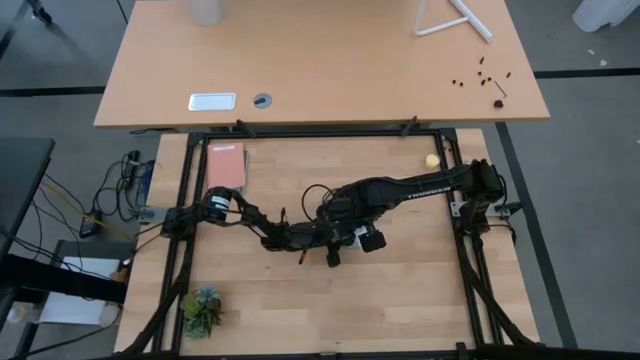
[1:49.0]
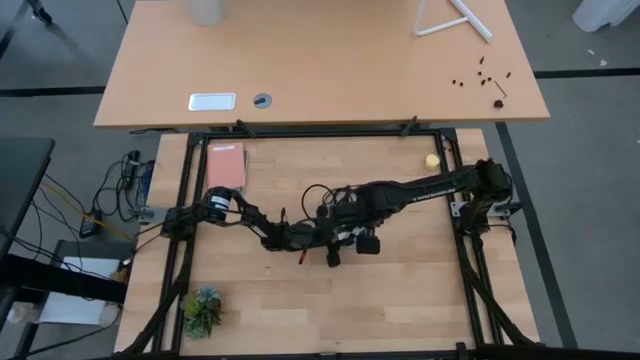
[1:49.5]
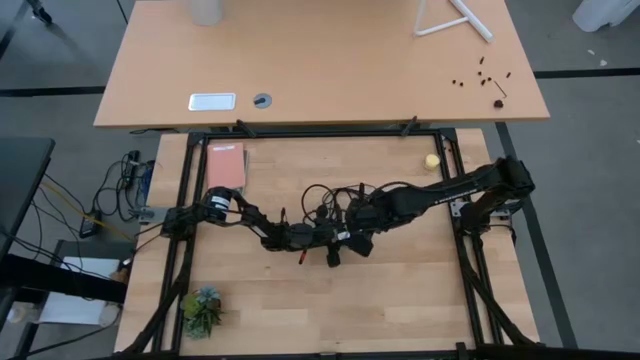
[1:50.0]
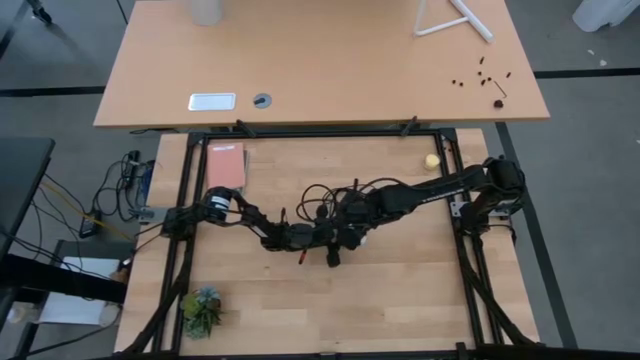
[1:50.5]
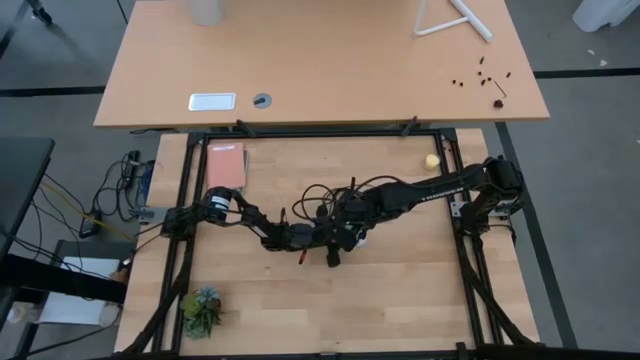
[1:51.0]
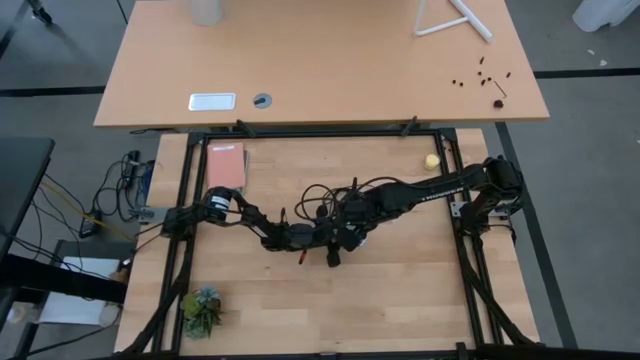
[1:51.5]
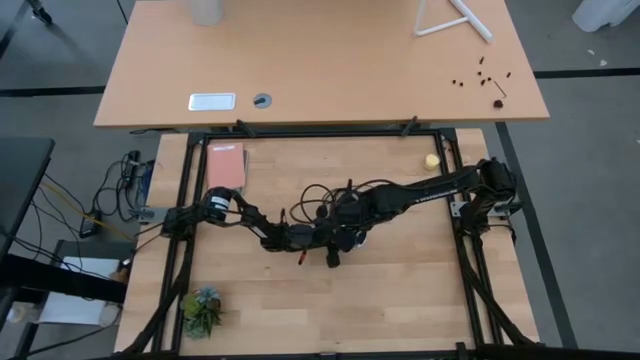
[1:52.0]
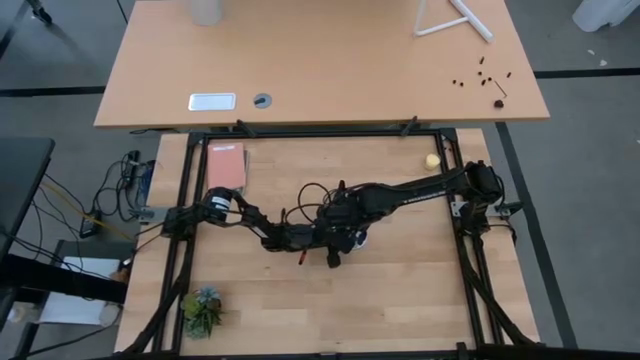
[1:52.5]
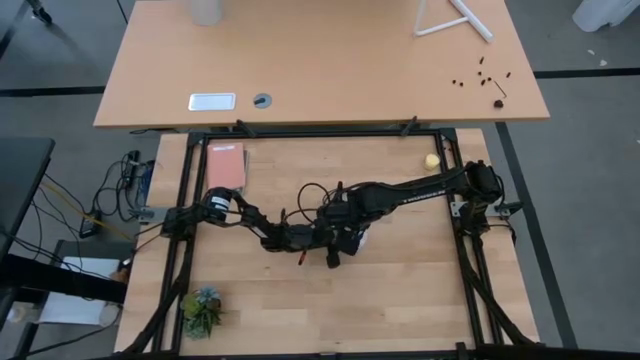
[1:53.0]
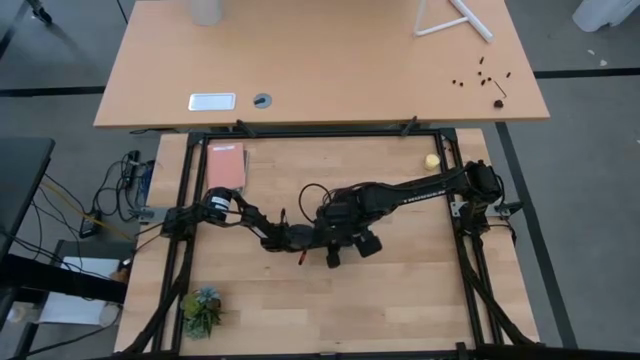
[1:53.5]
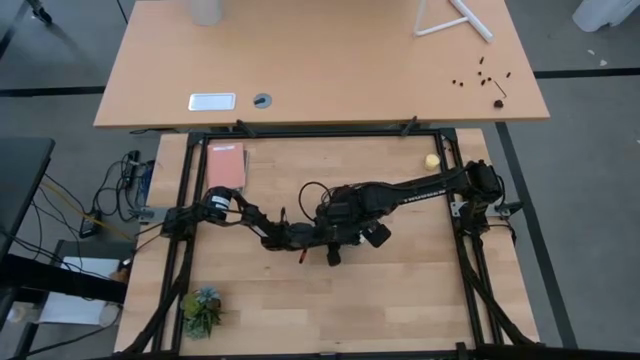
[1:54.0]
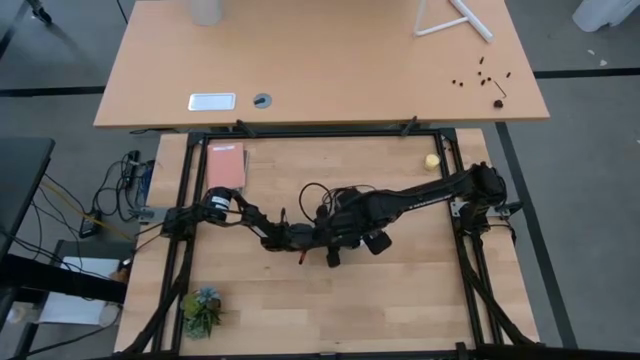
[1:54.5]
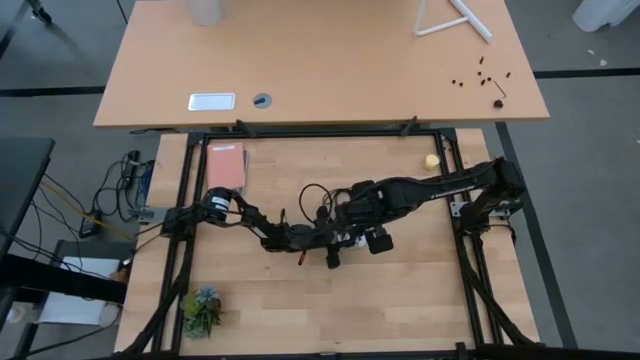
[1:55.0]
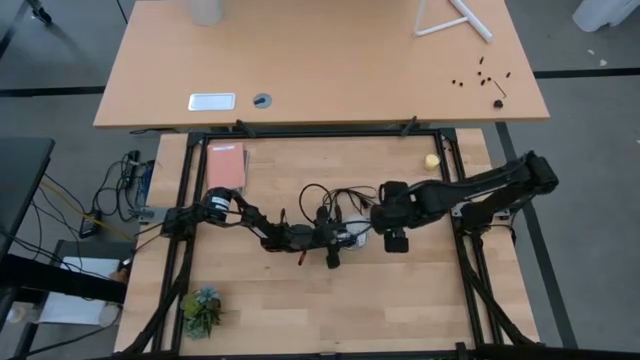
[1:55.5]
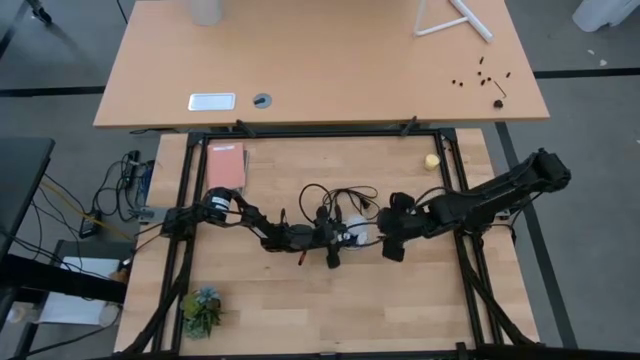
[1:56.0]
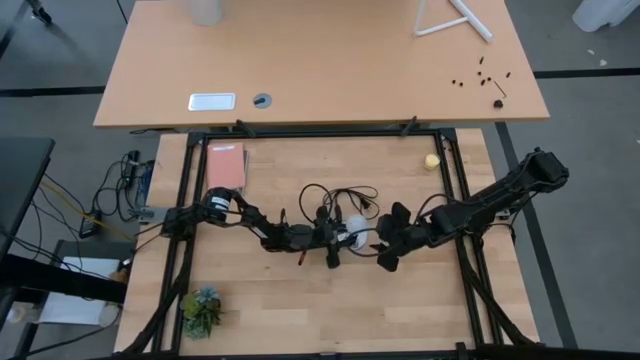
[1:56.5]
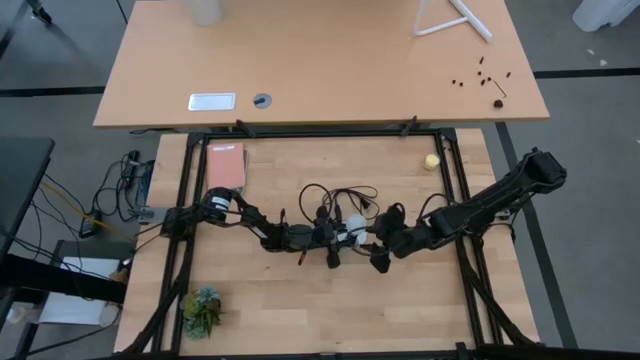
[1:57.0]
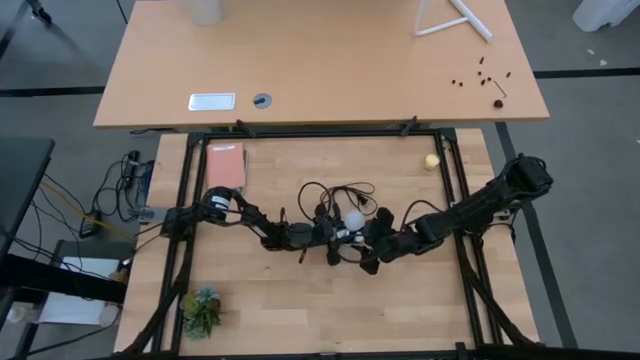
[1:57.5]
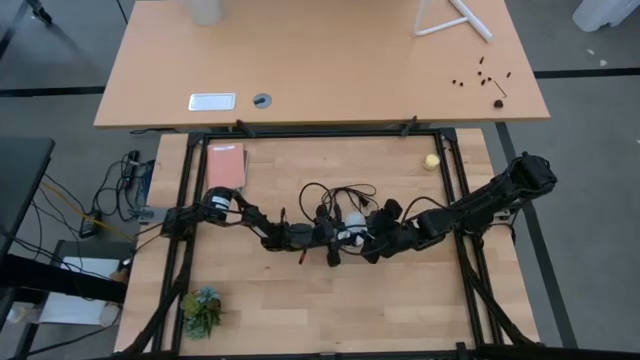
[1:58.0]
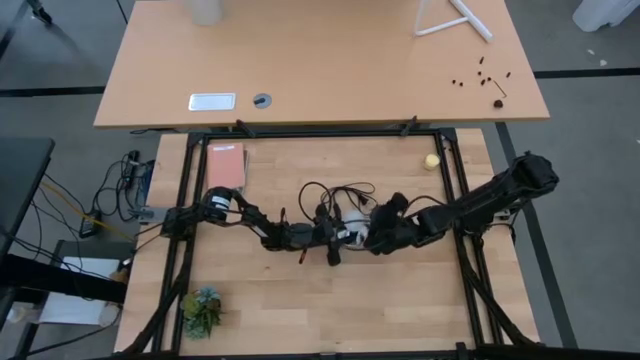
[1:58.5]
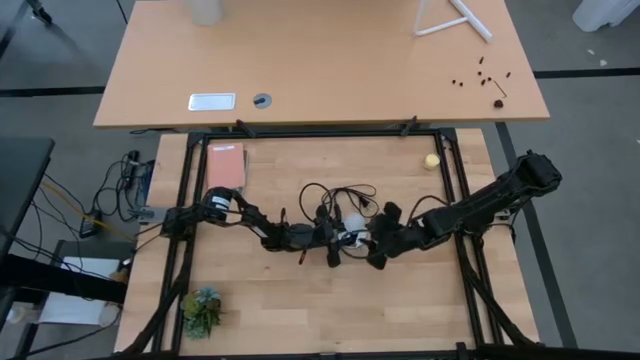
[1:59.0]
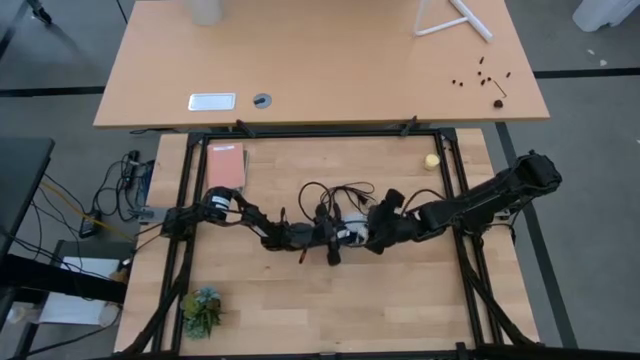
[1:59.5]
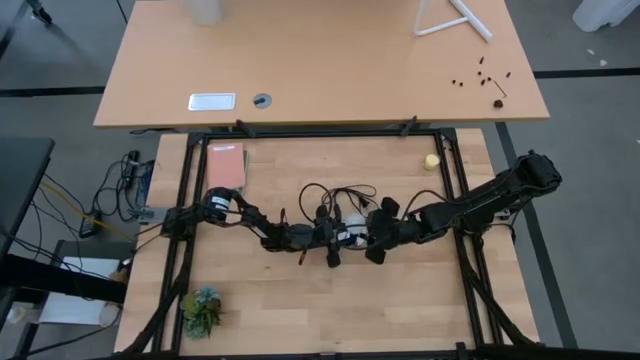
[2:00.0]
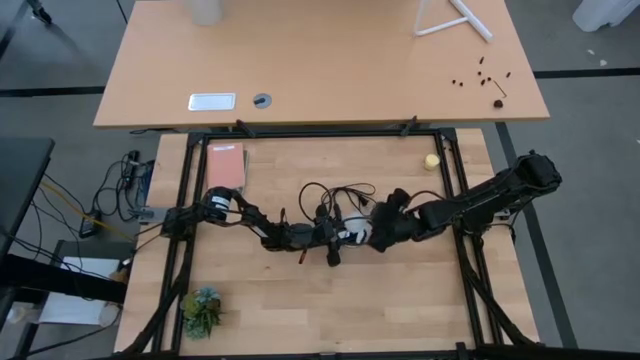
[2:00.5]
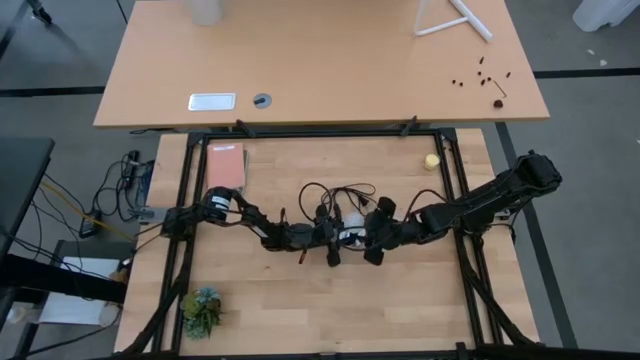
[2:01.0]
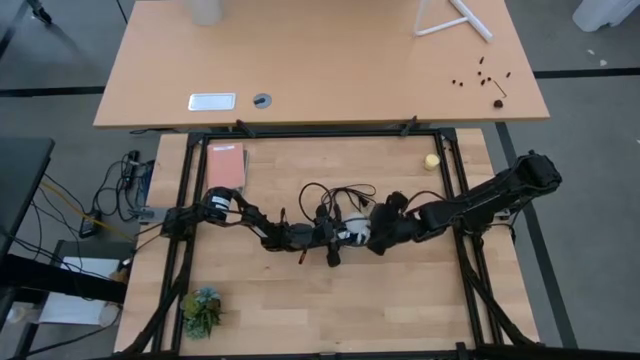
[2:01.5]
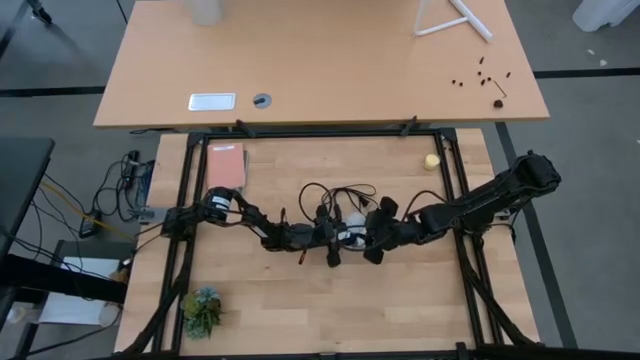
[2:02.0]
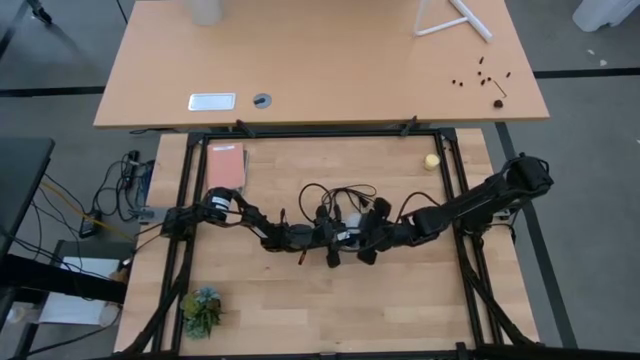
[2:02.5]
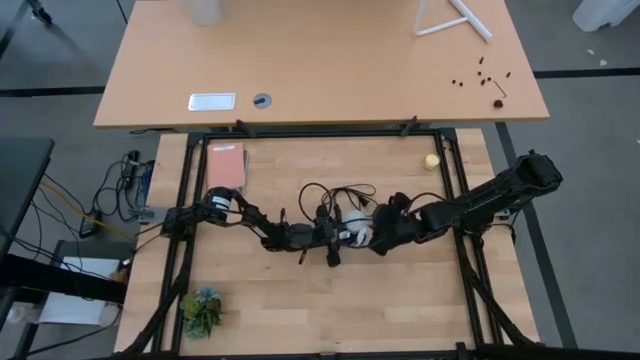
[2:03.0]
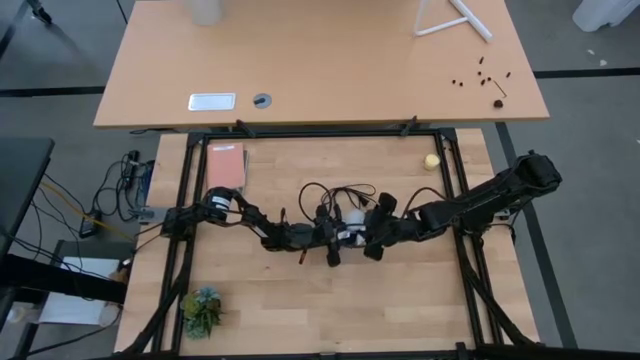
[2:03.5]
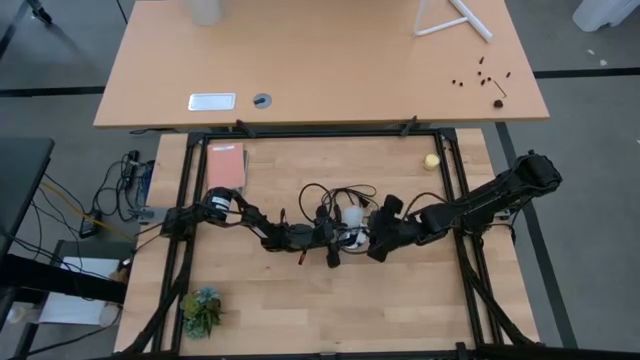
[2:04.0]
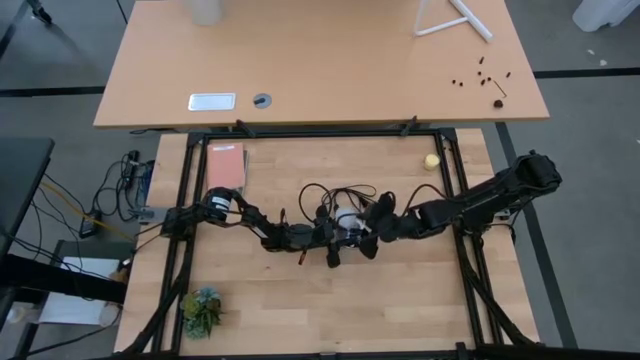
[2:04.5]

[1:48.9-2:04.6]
Task: Screw lightbulb
Remove the lightbulb from the socket

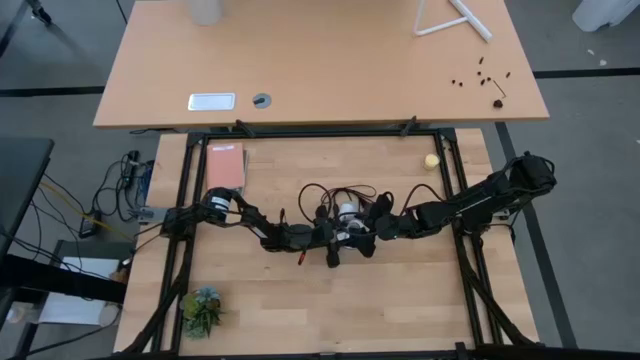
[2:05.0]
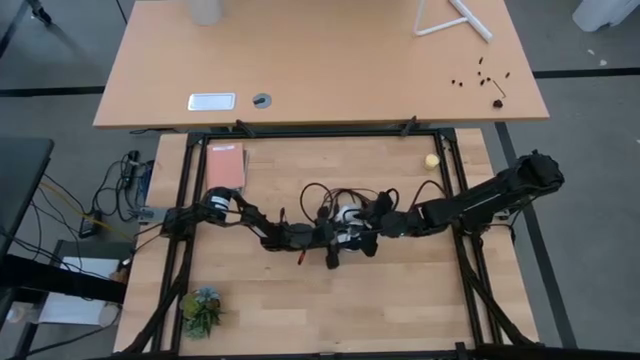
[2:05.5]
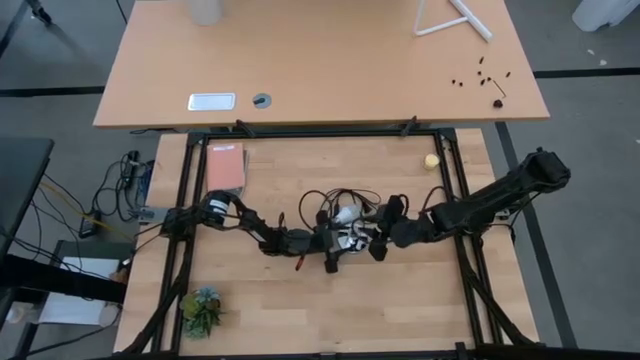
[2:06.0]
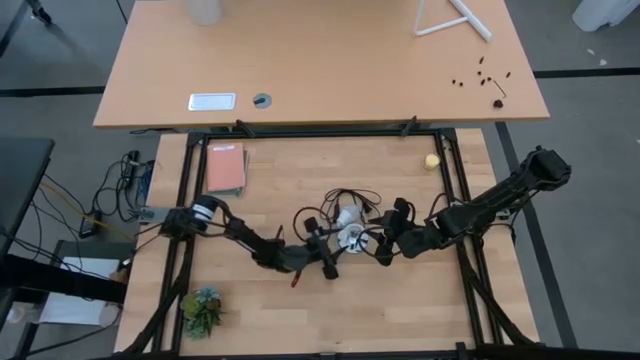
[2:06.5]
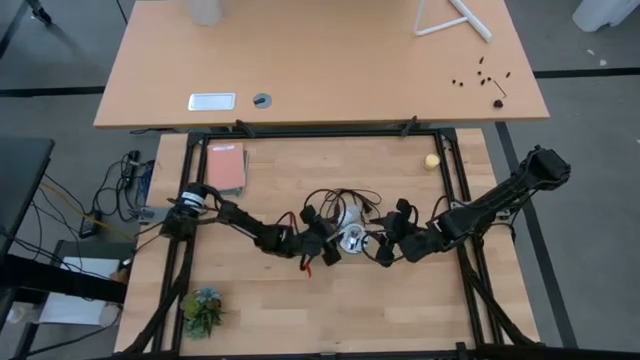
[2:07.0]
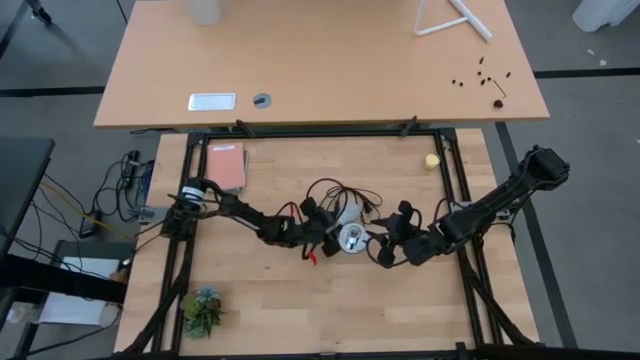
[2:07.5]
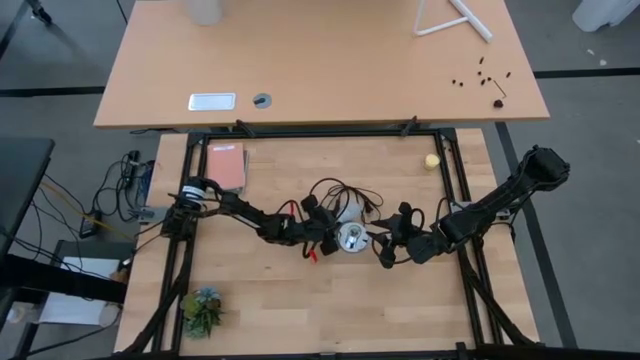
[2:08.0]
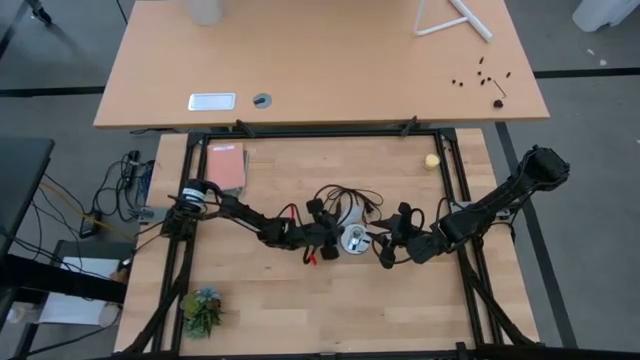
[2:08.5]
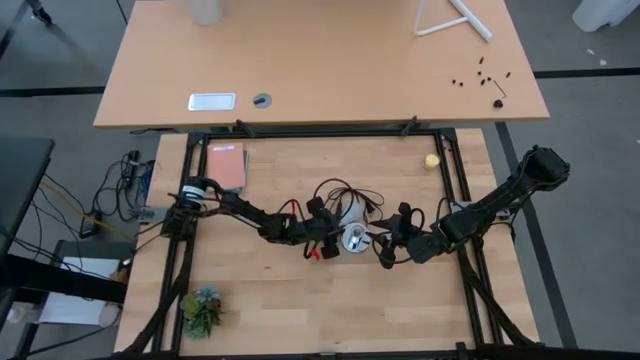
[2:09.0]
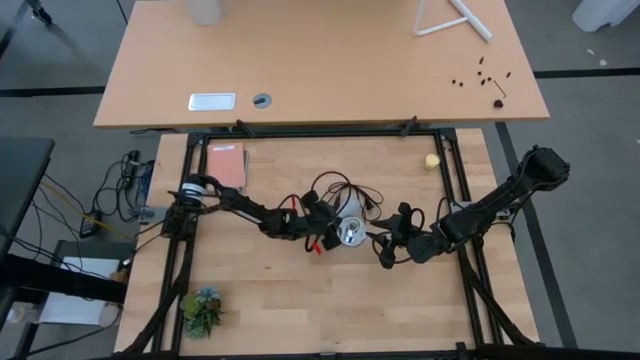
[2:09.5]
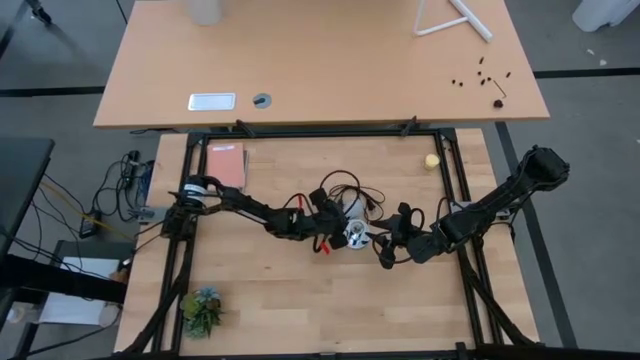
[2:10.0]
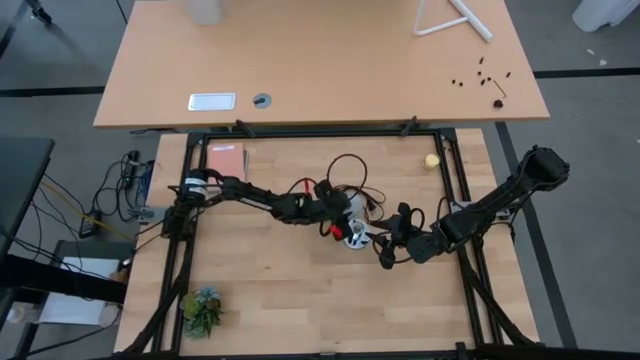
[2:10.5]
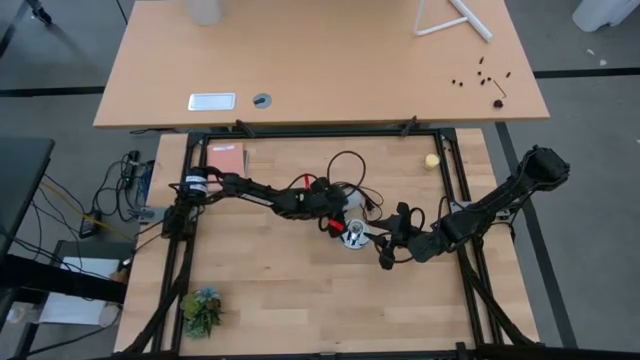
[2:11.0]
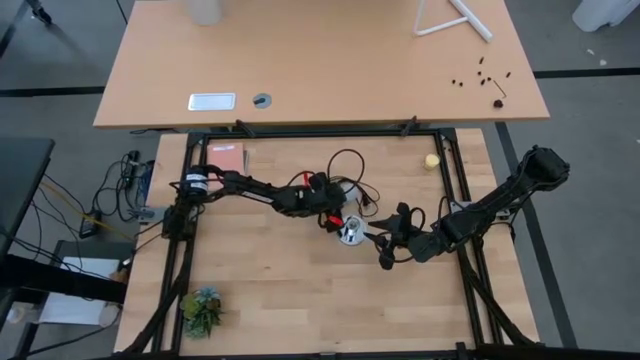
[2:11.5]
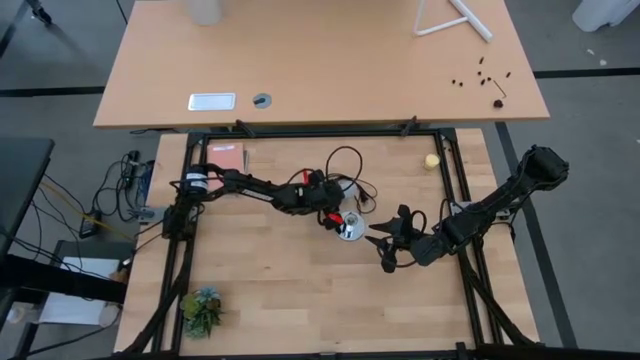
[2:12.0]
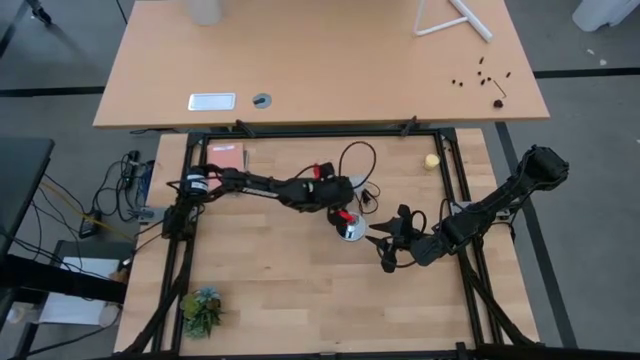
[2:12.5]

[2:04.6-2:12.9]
Move the lightbulb to the middle left
